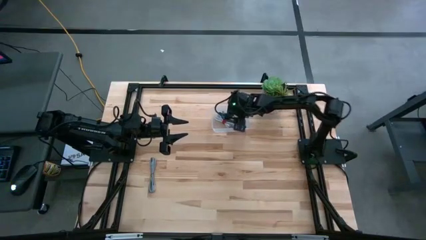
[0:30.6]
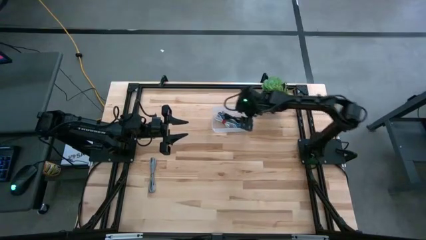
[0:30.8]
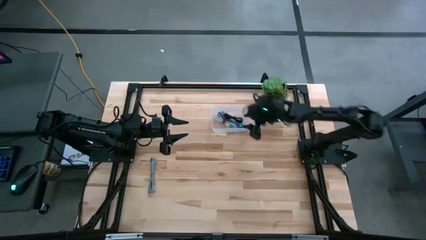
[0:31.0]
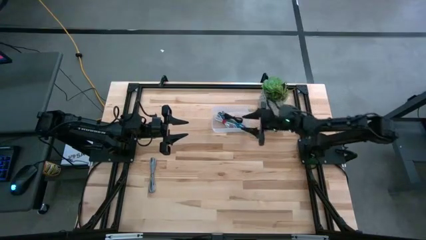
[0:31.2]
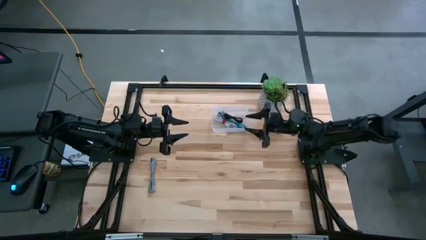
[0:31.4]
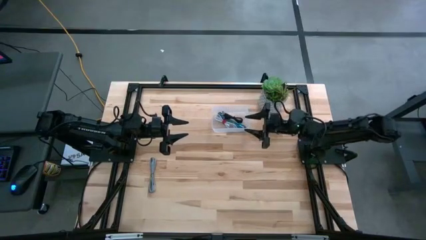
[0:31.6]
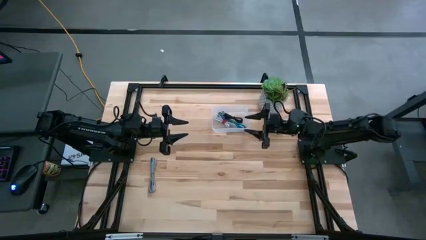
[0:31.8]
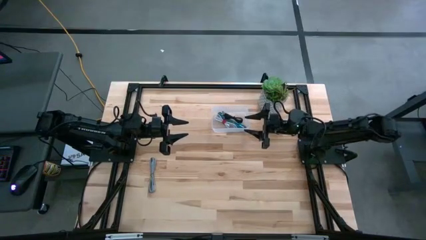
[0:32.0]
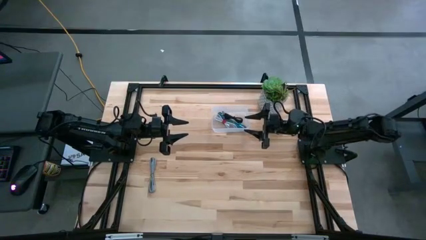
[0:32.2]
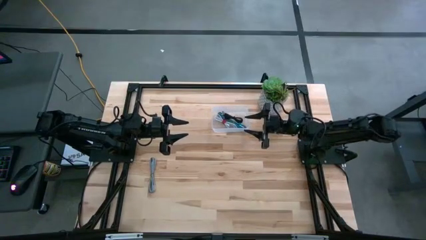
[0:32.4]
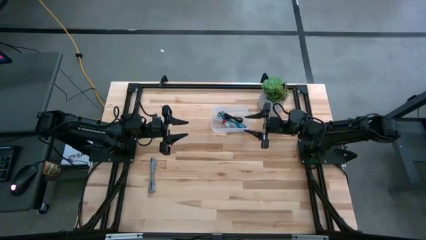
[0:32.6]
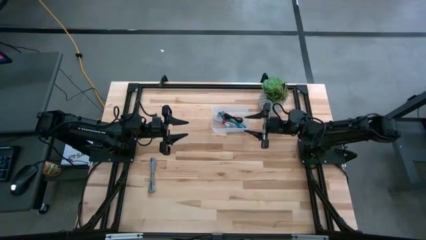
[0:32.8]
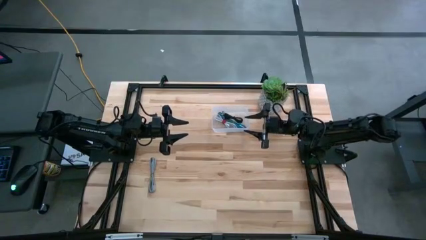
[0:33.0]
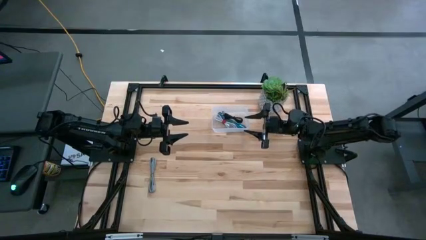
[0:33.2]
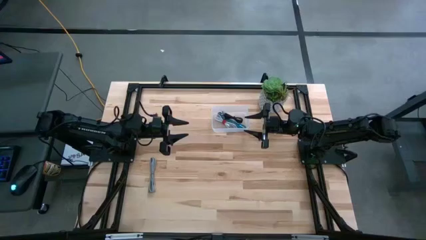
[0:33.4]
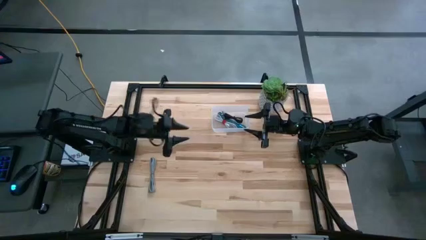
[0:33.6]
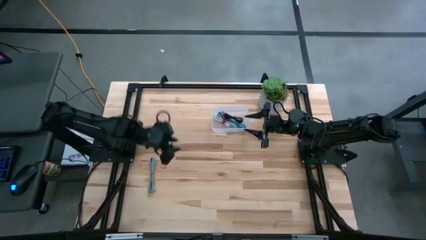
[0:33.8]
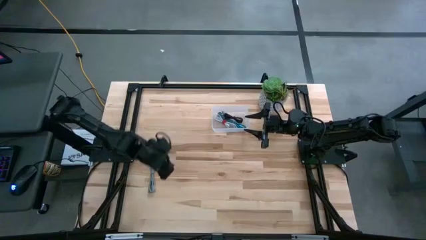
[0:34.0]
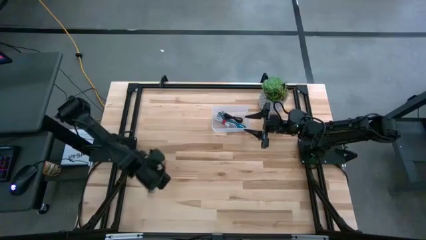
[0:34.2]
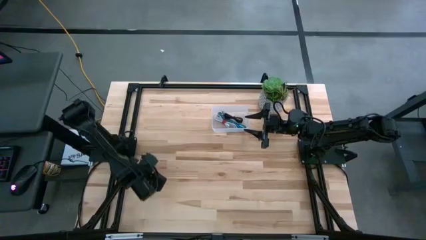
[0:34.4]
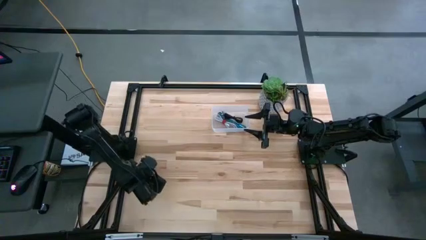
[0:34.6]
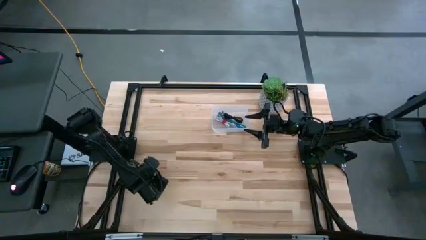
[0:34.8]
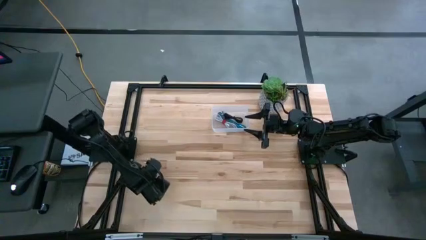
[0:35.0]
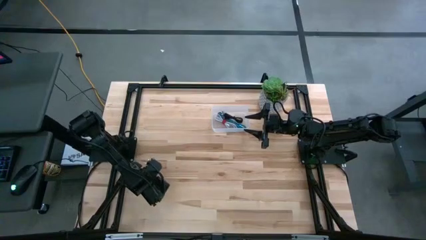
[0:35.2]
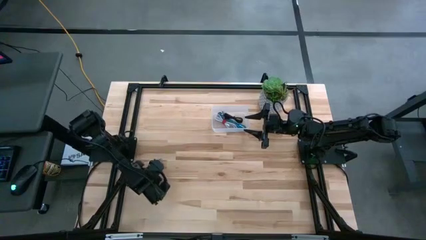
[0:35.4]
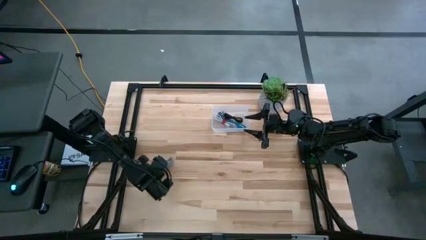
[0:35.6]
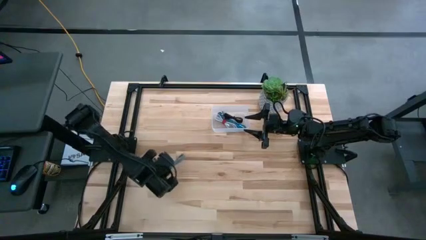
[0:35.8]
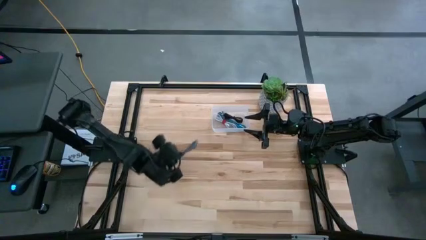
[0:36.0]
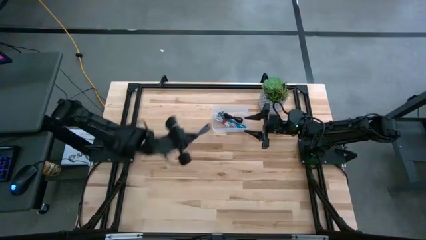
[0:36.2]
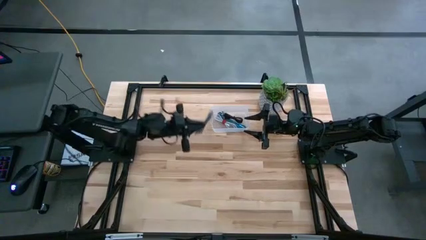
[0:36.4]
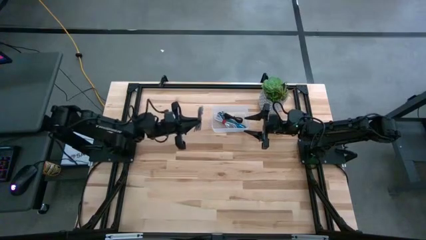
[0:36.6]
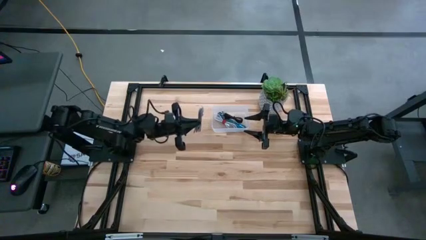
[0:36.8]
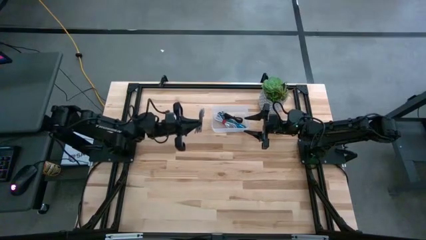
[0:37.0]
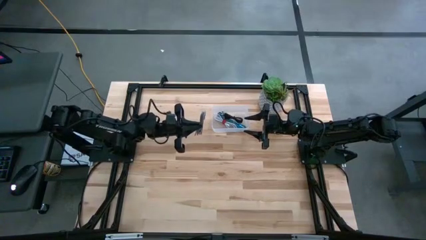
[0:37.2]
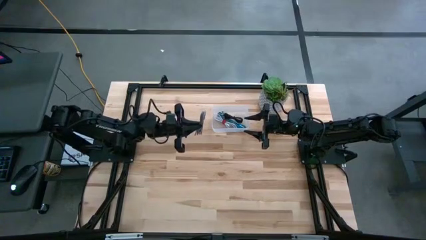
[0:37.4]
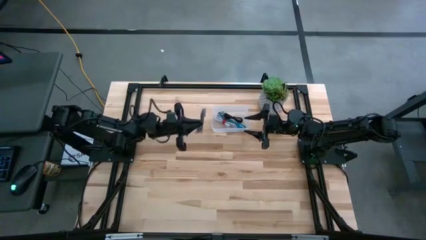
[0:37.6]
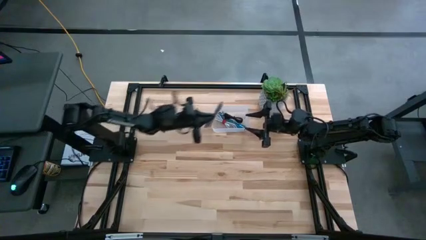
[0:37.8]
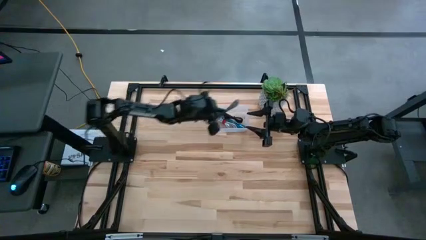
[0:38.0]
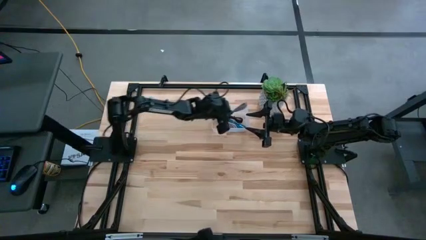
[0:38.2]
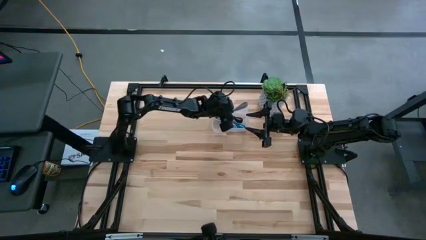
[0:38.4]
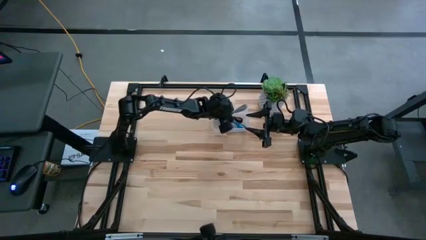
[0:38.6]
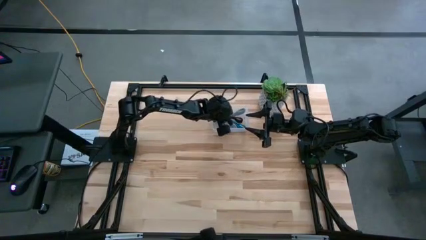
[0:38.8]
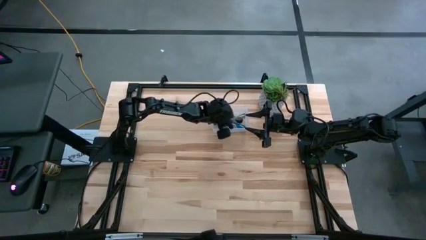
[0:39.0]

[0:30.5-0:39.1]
Task: Pick and place USB-C Cables
Put the black and white charger cable into the transparent bin

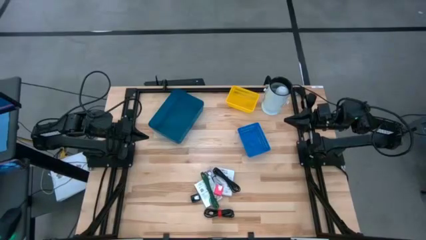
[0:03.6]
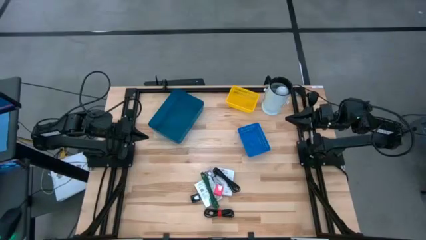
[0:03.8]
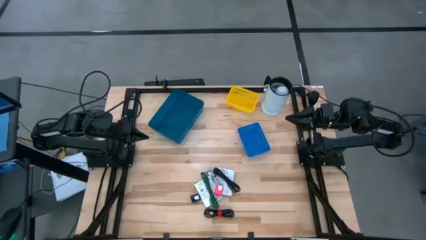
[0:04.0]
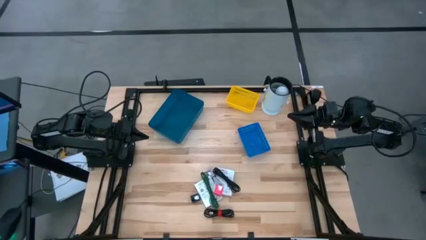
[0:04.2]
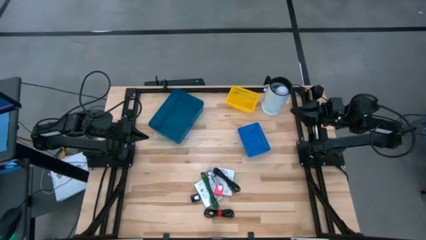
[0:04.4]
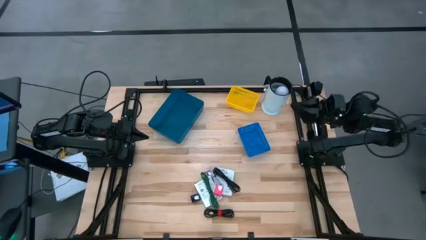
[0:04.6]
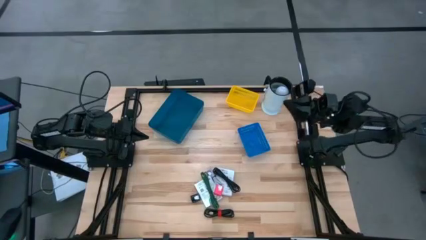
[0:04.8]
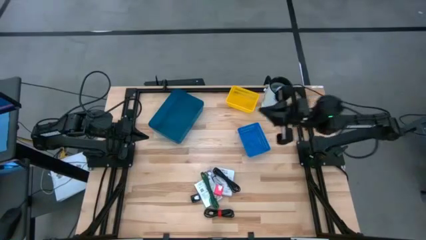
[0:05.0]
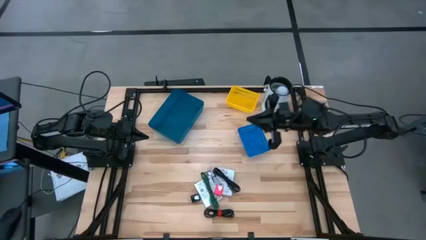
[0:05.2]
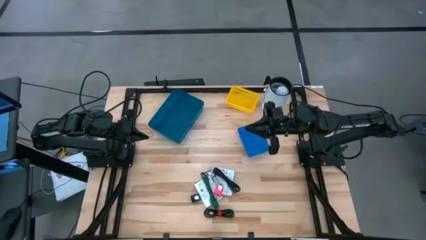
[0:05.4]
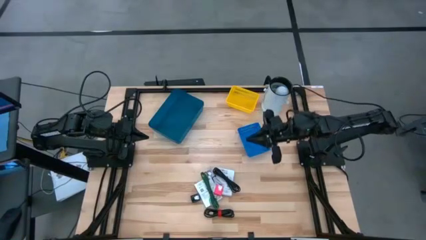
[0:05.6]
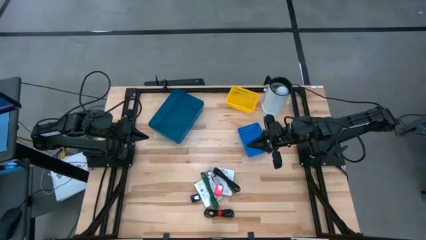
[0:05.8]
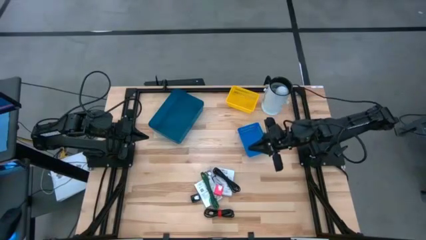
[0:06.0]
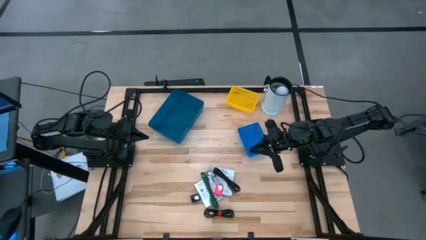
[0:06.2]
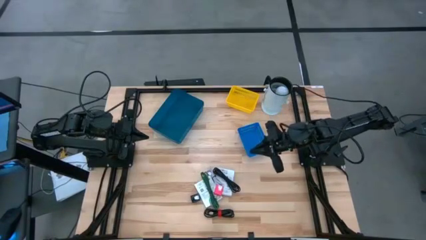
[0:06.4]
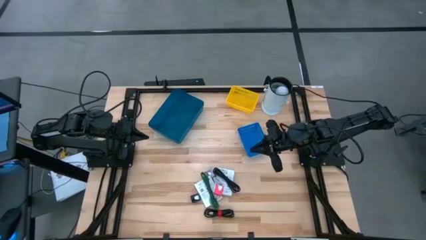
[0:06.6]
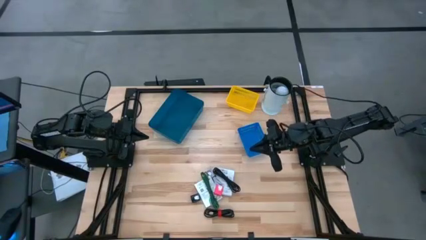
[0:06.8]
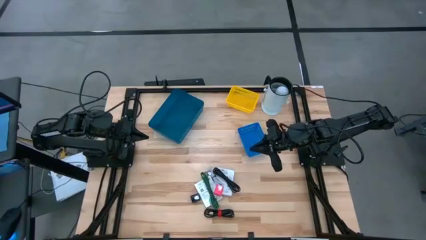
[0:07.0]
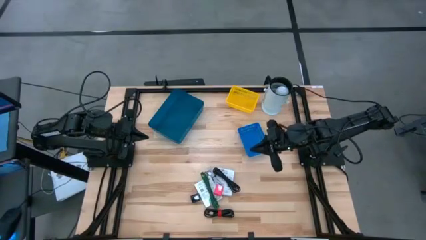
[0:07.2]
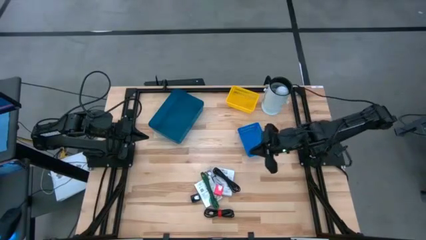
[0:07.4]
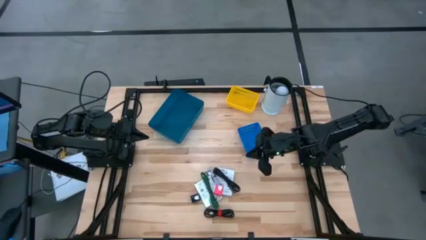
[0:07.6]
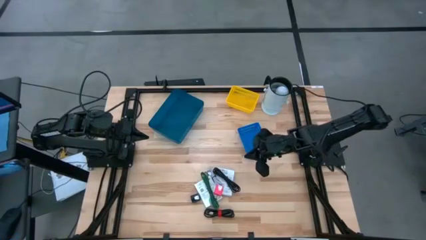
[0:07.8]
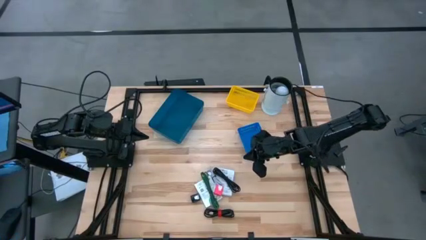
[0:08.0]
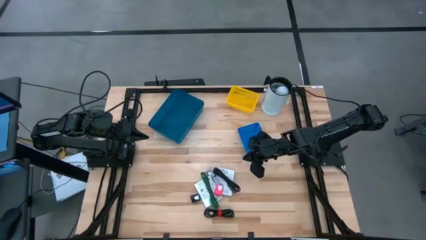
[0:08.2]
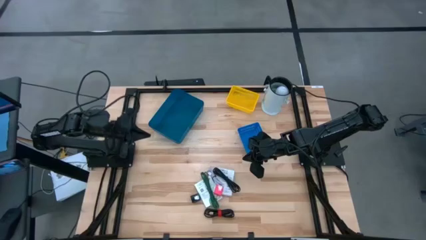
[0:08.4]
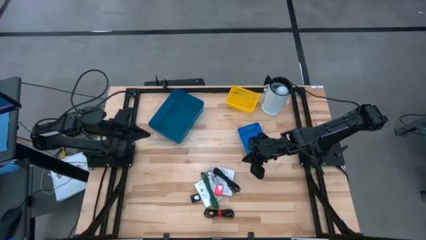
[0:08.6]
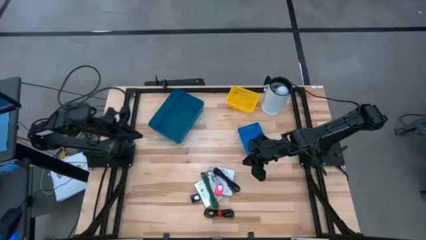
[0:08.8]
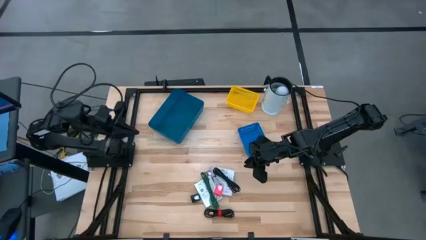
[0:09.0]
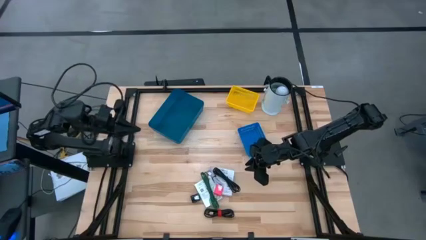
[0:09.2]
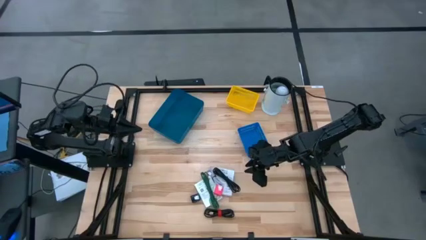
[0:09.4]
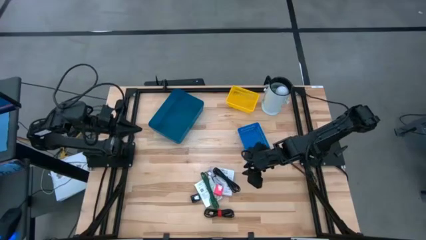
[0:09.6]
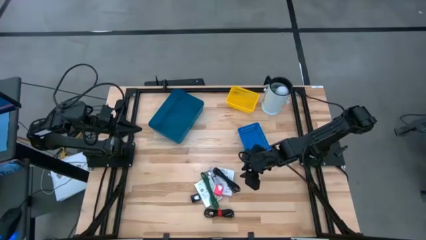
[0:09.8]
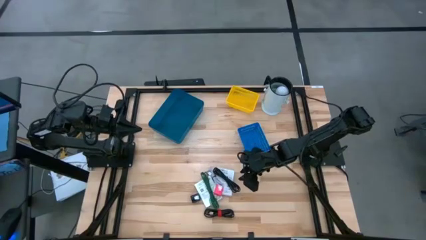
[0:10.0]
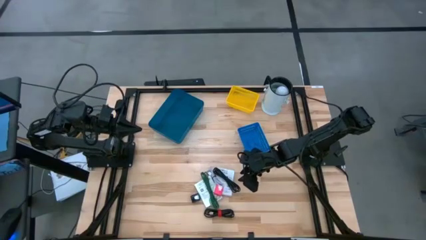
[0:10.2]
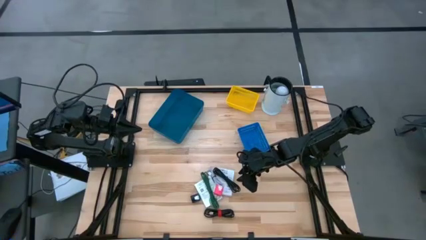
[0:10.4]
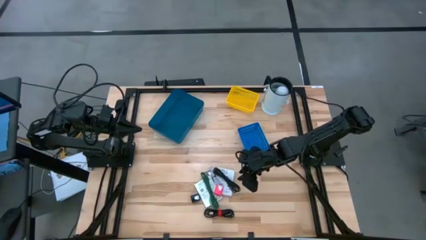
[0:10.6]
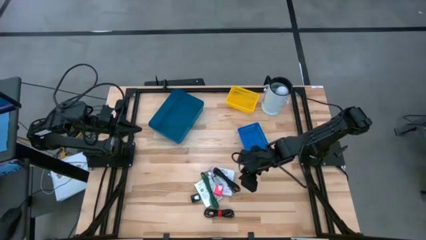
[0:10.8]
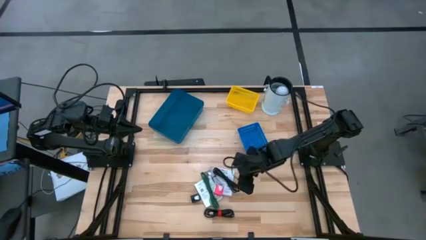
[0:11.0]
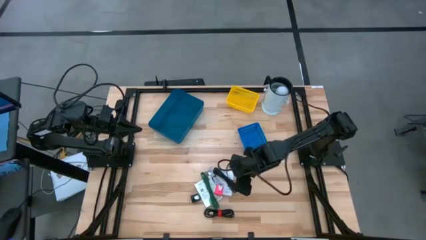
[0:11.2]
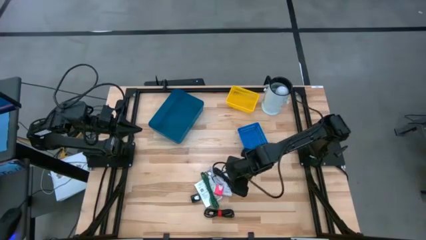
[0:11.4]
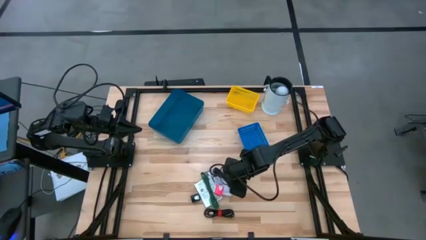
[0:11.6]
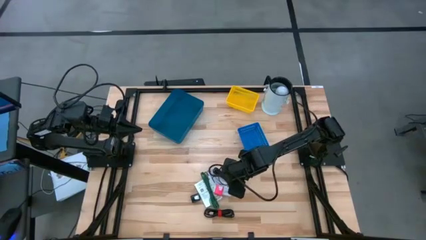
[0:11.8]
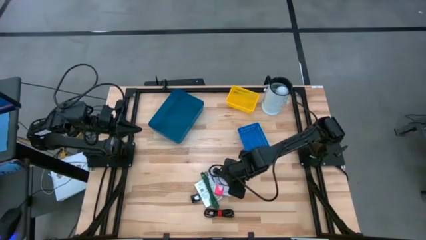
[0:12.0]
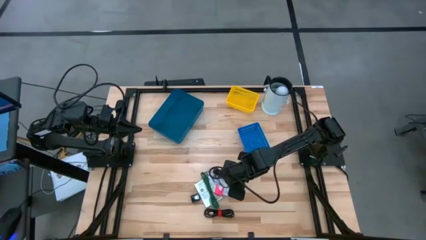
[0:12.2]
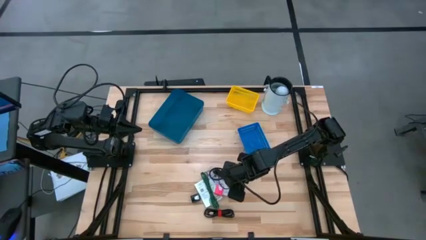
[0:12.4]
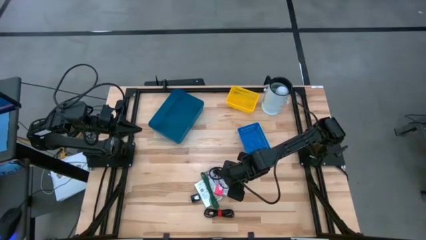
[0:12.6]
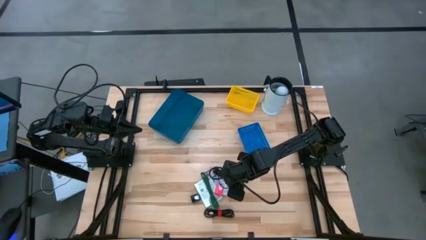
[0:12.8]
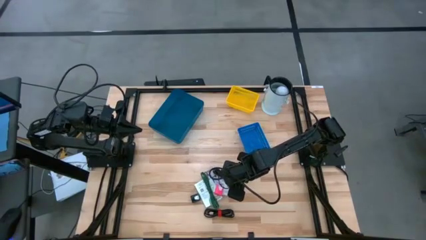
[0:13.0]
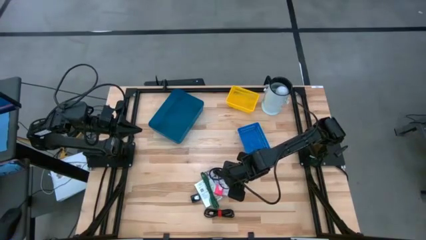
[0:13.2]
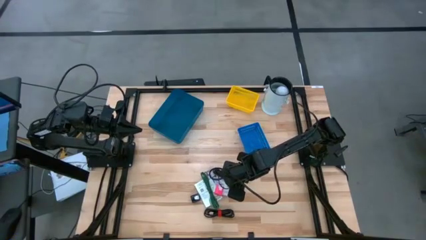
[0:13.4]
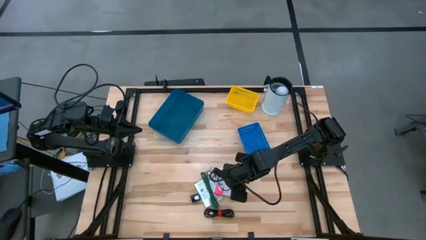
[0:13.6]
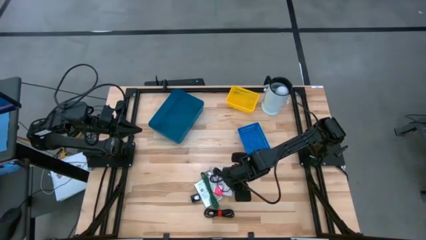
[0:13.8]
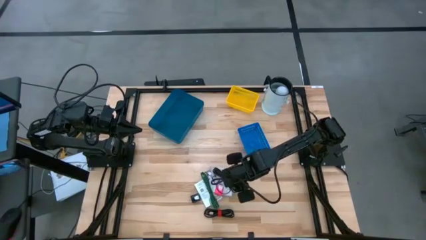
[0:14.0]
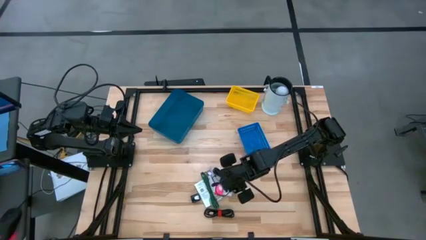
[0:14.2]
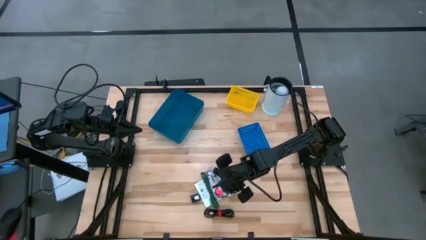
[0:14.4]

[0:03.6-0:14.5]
Task: Pick and place items into bin
Put the pink charger adapter into the blue bin
